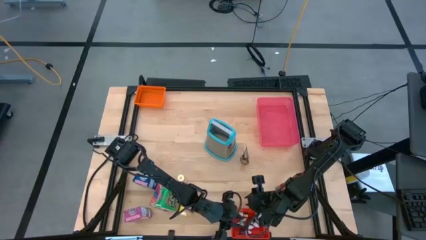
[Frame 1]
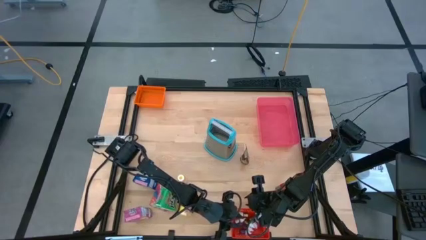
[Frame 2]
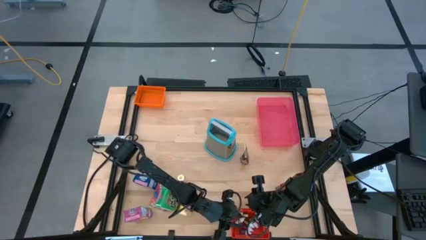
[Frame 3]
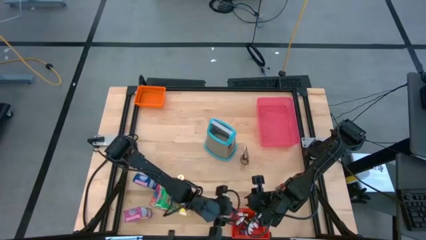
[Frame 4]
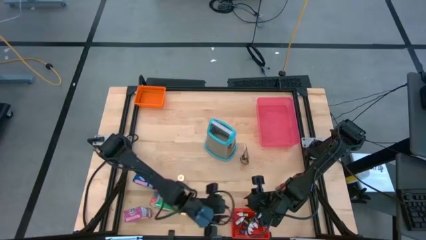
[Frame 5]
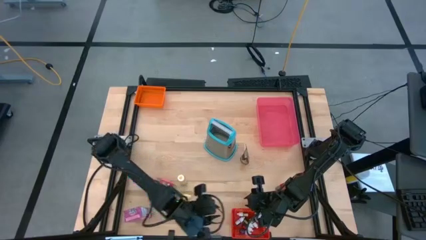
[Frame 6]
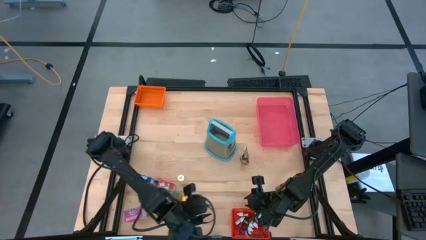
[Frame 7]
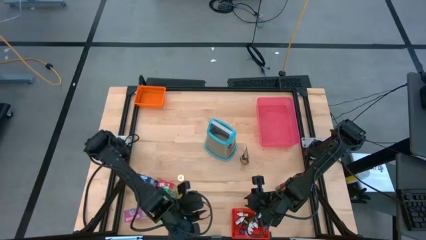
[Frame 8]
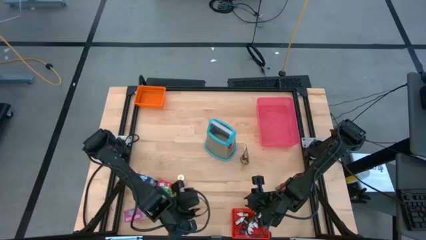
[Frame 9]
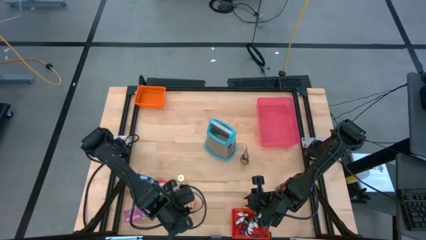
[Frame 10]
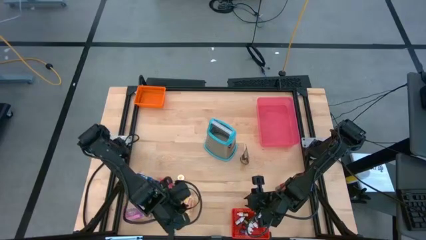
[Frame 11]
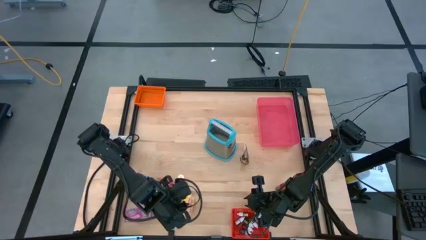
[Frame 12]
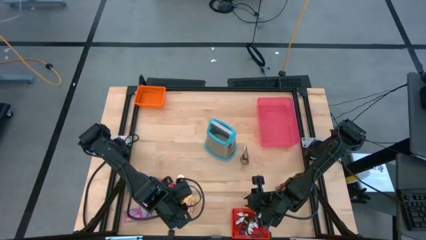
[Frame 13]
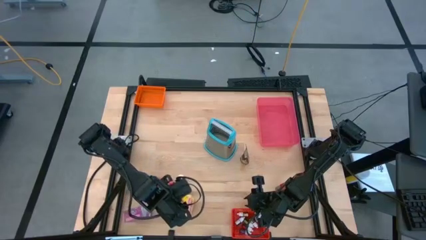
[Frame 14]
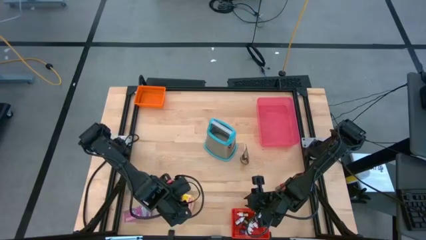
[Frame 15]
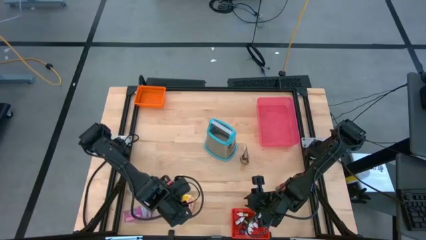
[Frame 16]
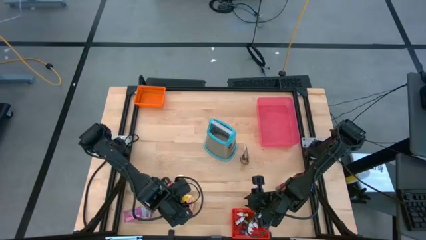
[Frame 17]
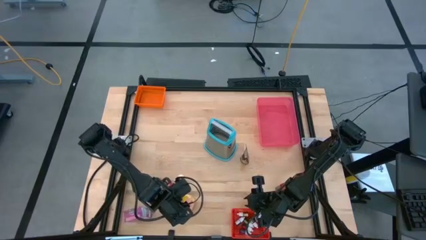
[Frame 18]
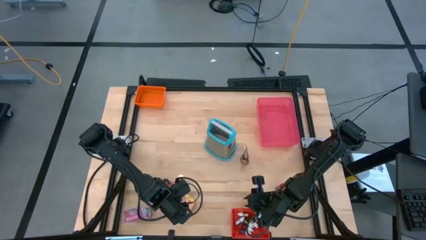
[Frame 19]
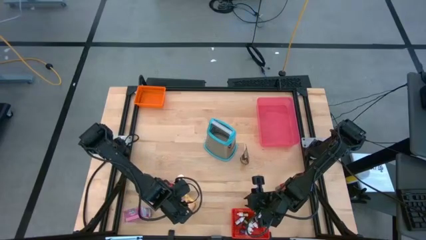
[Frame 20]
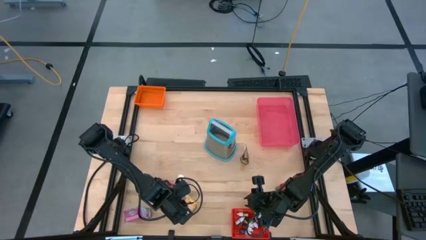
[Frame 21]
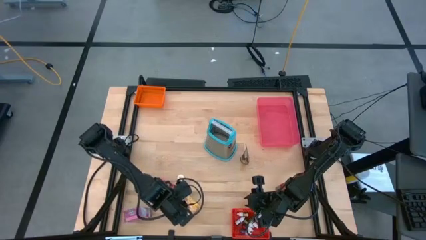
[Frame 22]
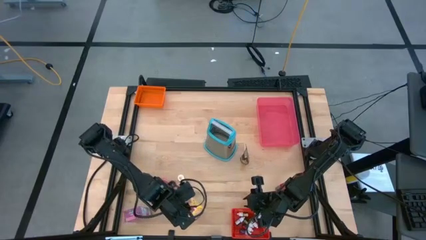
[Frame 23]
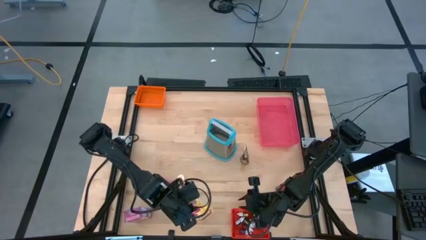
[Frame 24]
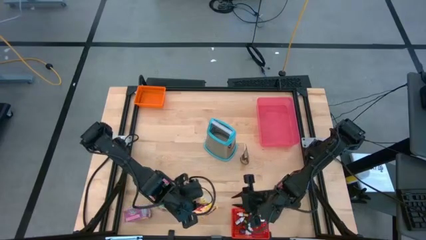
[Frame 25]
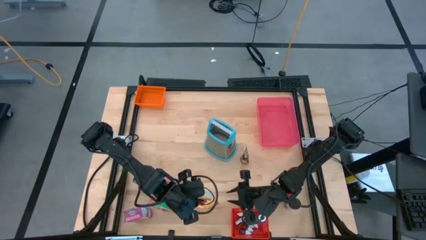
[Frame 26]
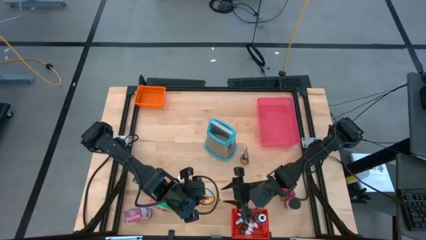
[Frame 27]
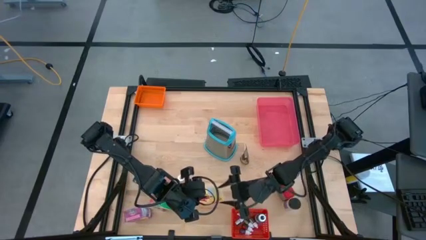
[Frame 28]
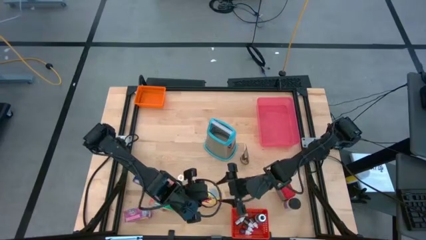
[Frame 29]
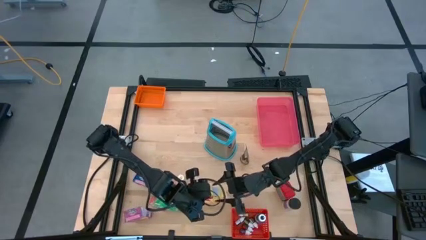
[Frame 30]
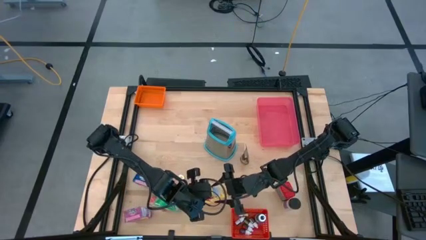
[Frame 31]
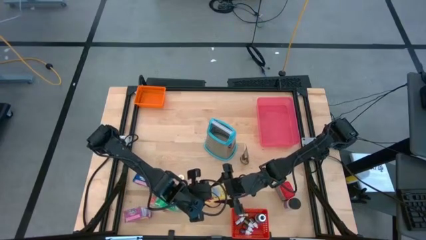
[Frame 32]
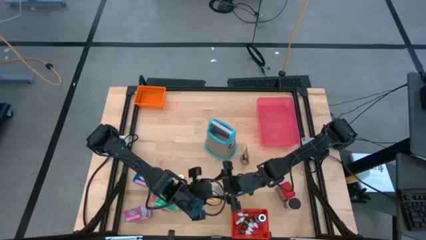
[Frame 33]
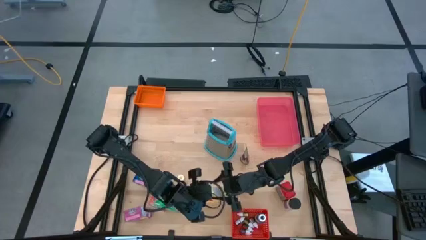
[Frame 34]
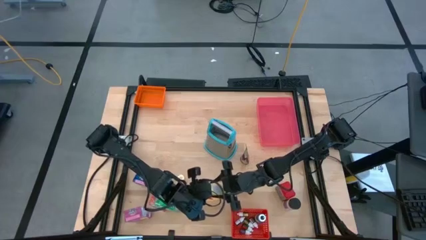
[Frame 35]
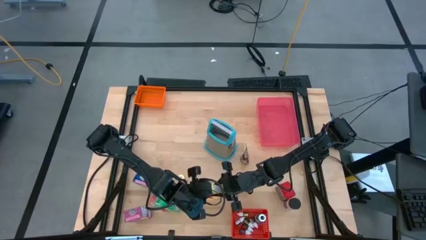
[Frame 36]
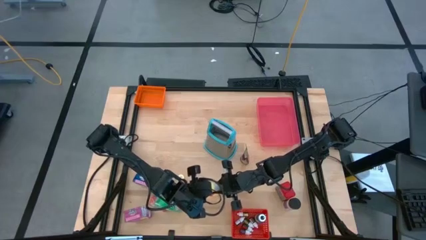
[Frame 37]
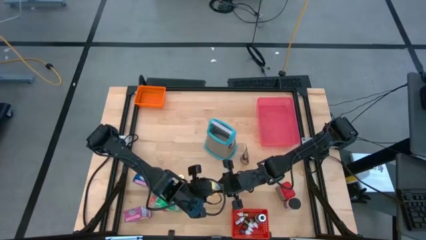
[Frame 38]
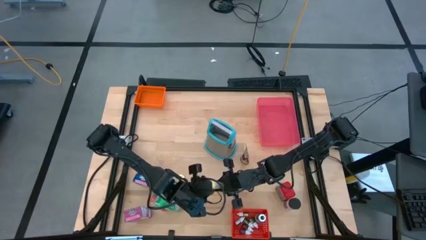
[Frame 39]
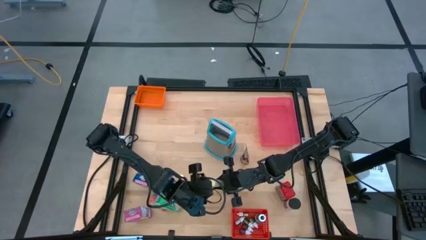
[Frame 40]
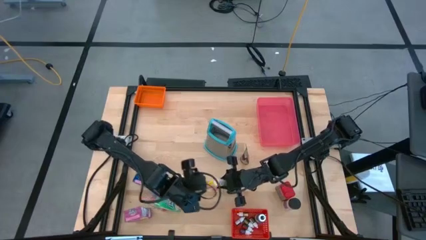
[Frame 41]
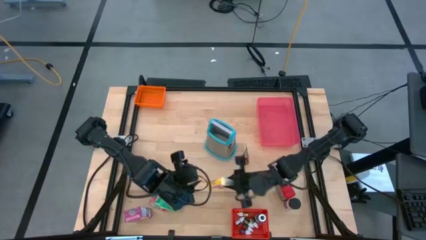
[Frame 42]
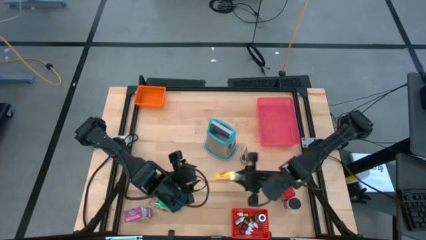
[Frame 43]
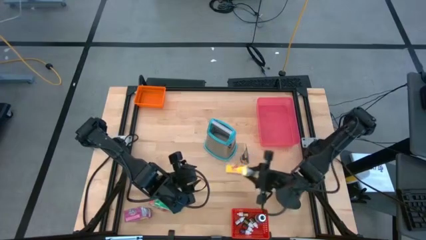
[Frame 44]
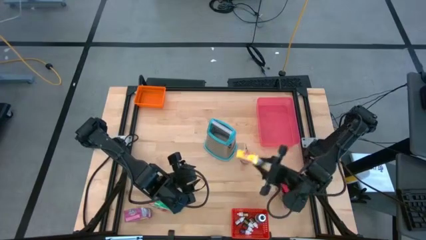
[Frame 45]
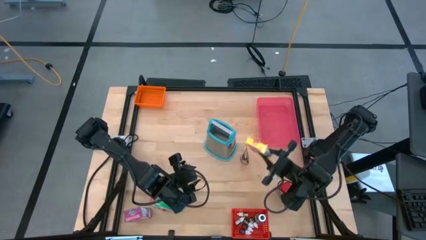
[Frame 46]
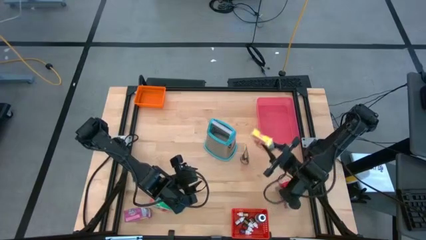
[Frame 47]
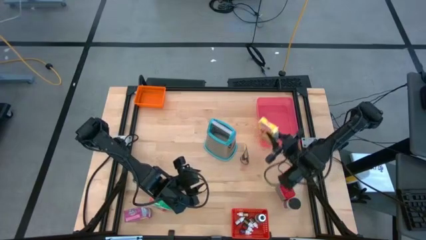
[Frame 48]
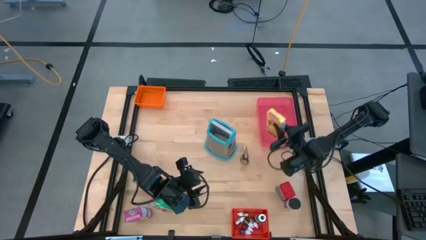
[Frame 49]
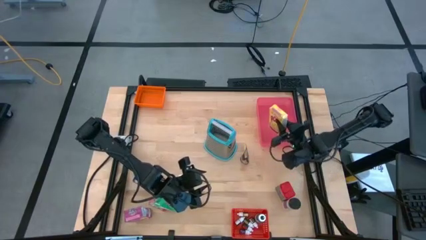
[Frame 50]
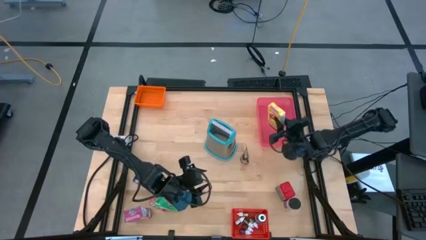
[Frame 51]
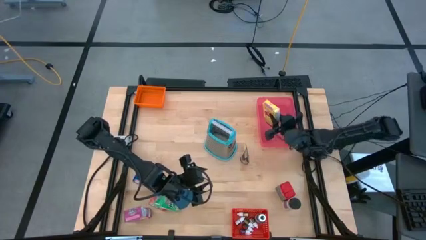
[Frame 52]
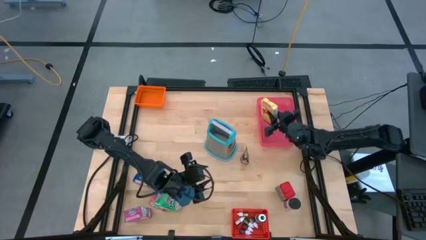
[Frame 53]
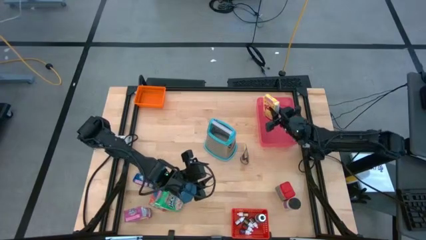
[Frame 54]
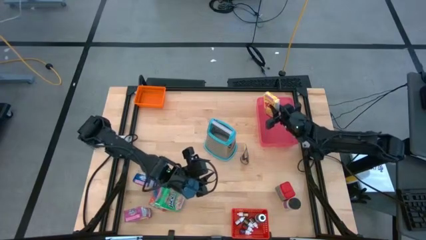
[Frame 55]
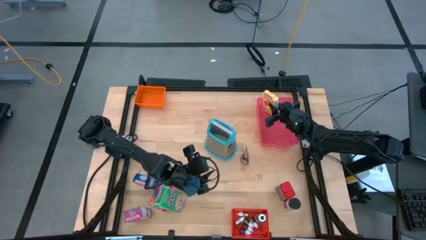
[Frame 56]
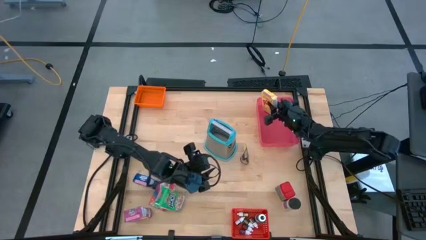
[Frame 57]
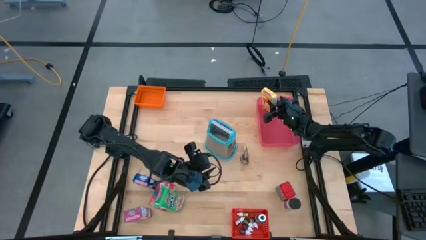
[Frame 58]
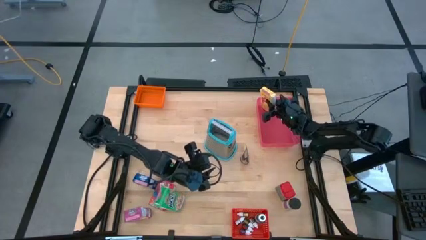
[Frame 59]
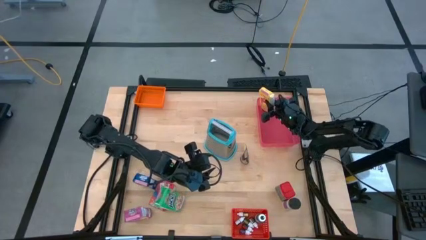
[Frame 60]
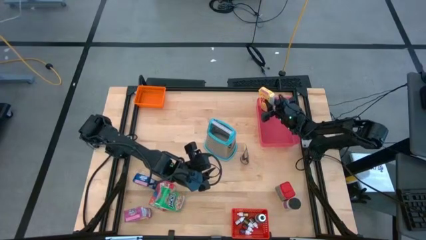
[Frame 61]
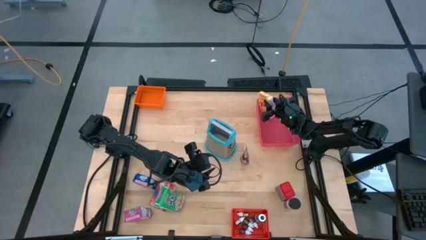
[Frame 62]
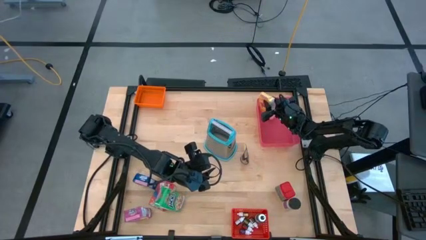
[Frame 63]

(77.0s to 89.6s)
Task: Pick & Place Kitchen Items
Put the yellow cereal box into the pink bin
